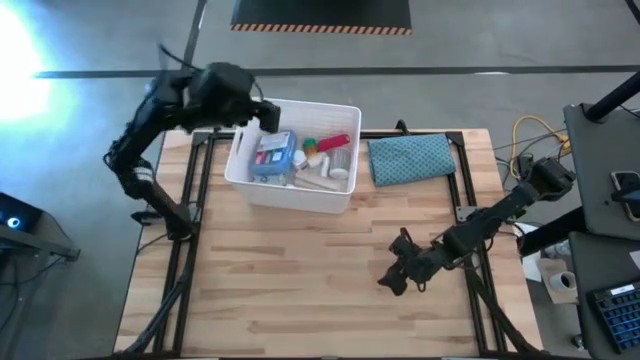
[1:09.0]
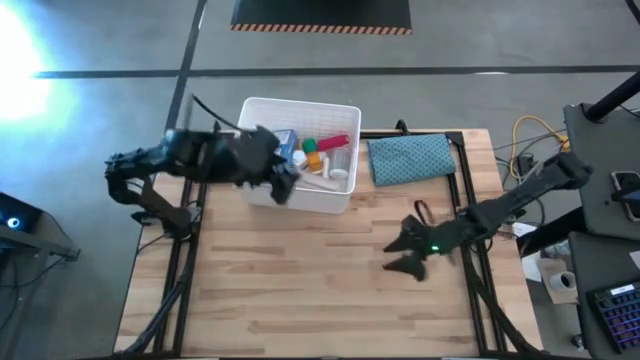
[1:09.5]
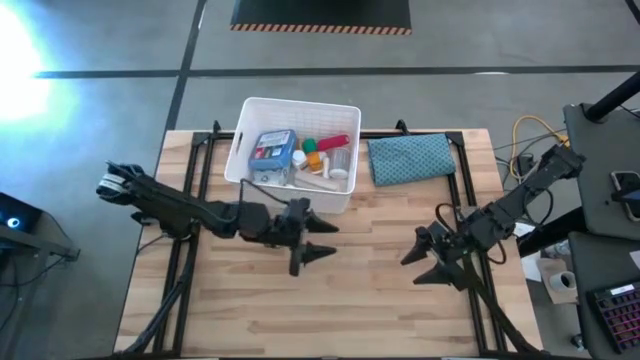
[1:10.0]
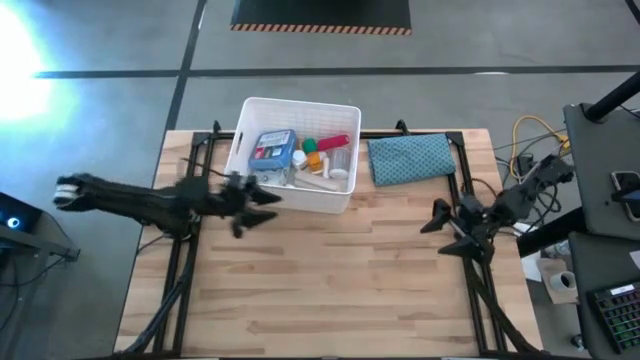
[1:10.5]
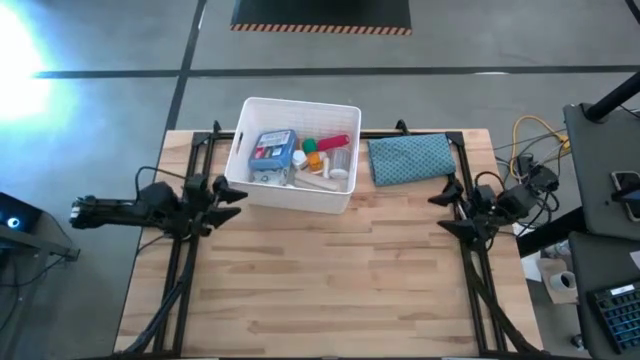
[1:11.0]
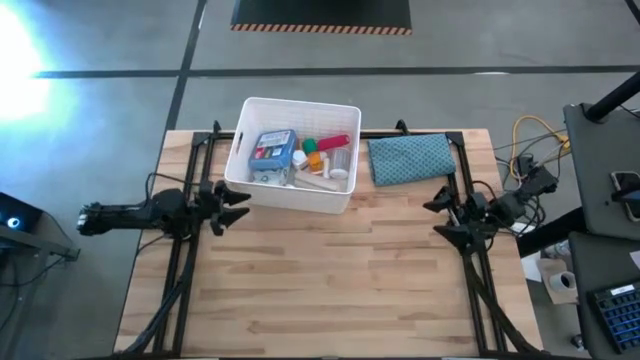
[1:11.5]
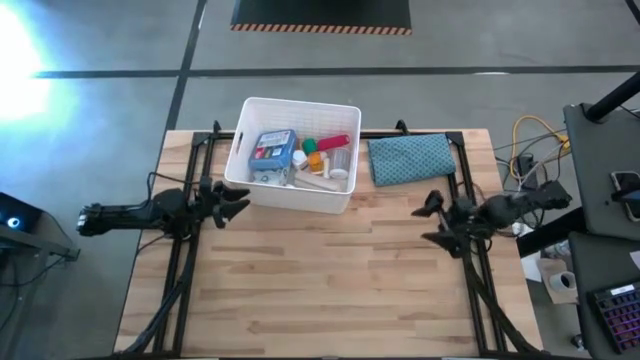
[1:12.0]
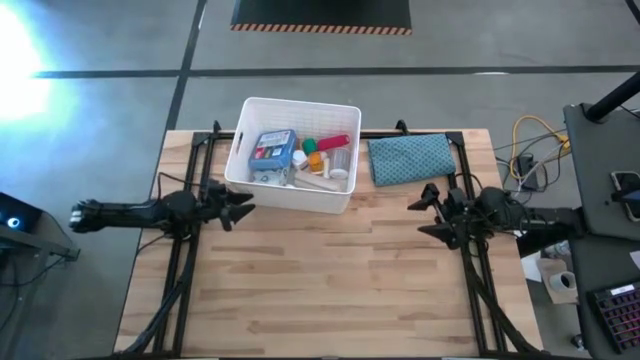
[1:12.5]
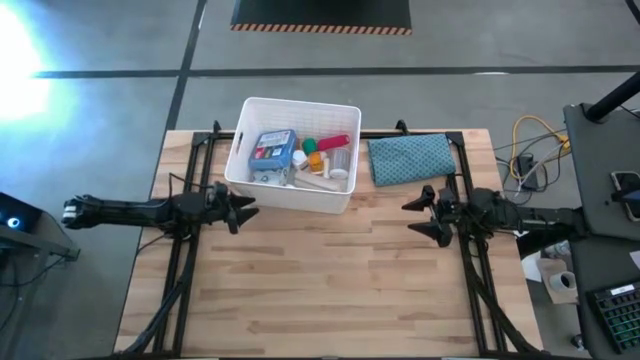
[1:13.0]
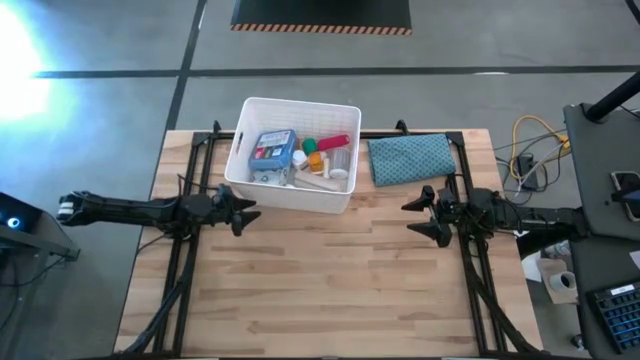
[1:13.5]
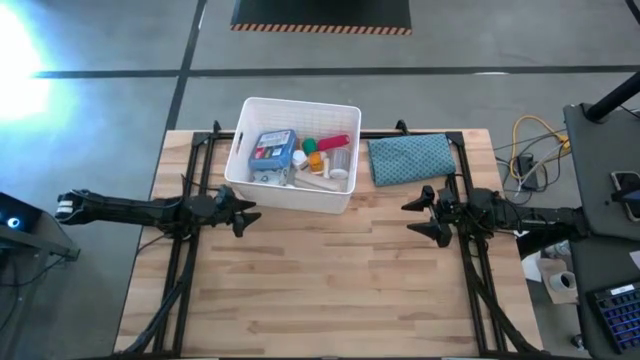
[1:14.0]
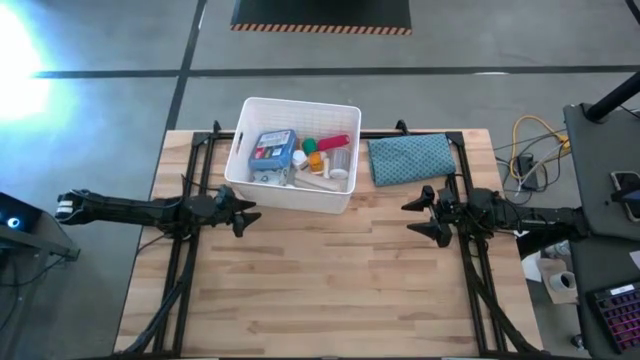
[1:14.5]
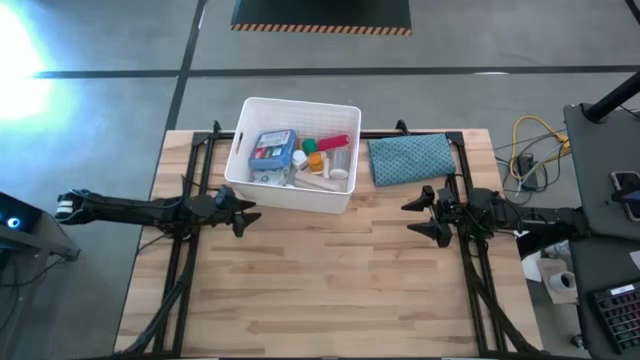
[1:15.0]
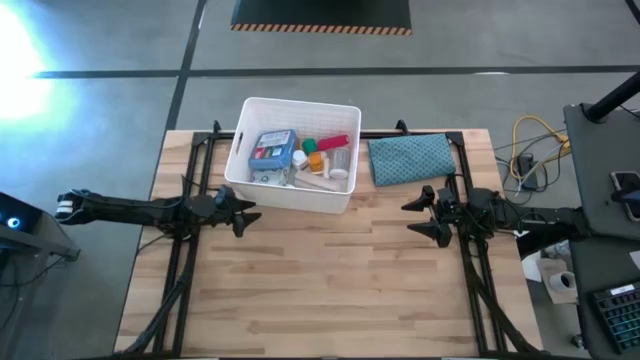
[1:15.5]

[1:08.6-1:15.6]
Task: Pick & place medical supplies in basket/bin
Return to Home Position

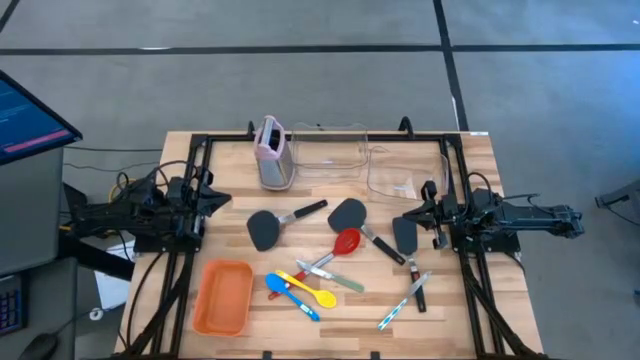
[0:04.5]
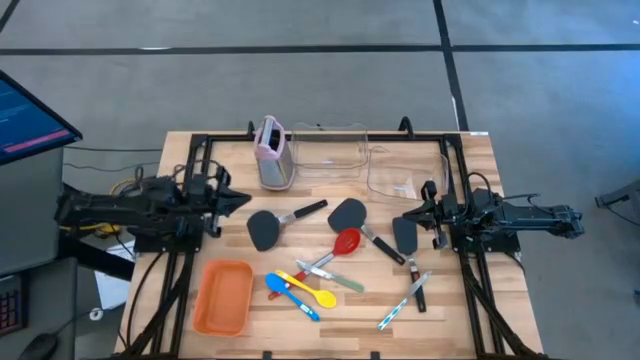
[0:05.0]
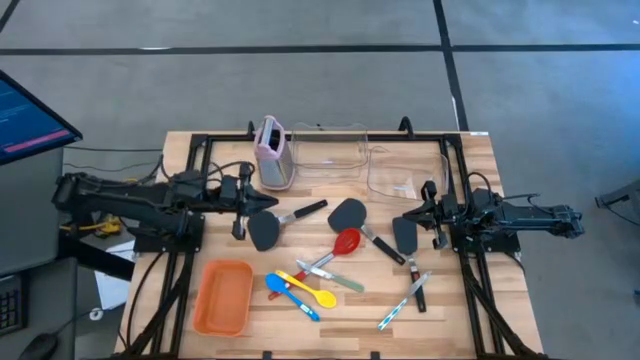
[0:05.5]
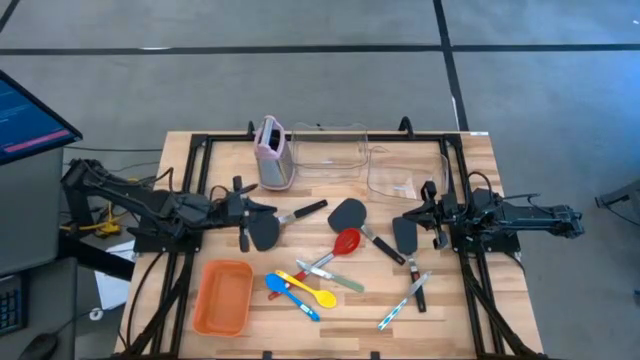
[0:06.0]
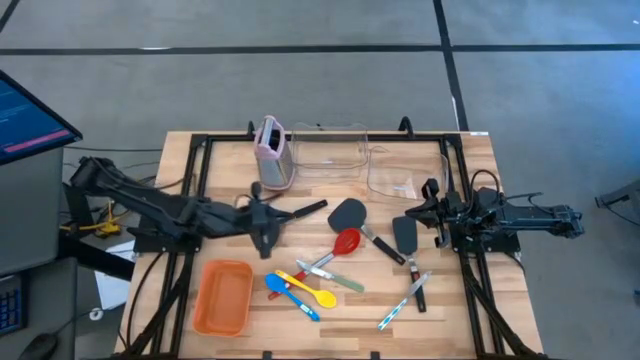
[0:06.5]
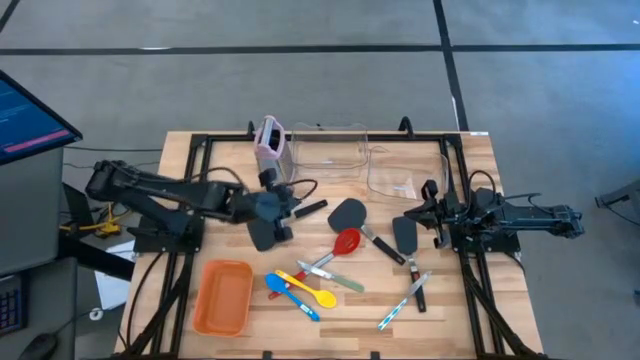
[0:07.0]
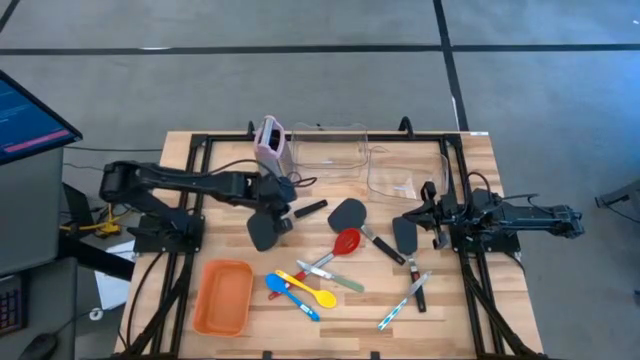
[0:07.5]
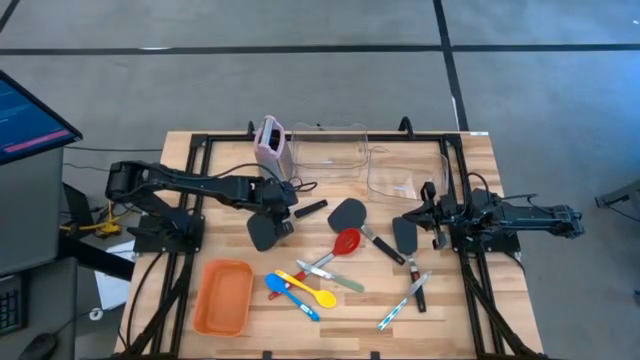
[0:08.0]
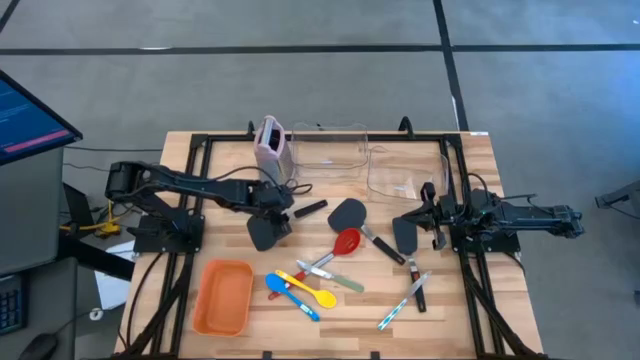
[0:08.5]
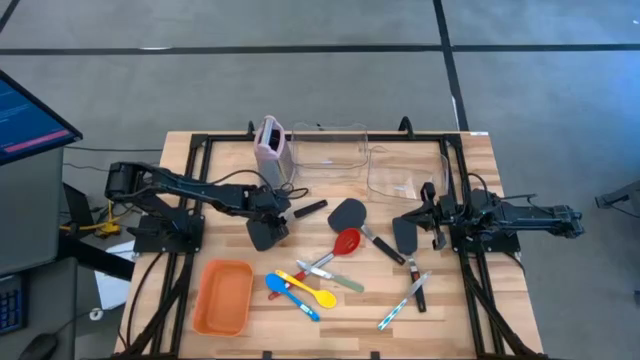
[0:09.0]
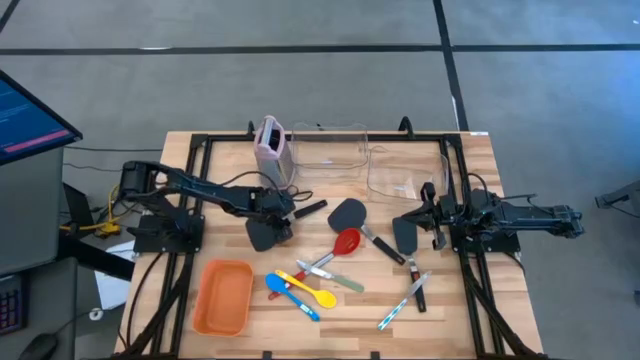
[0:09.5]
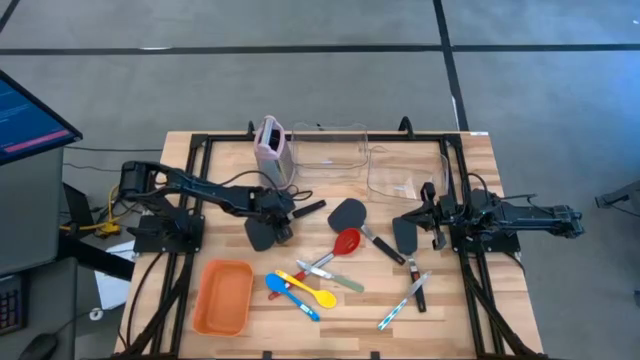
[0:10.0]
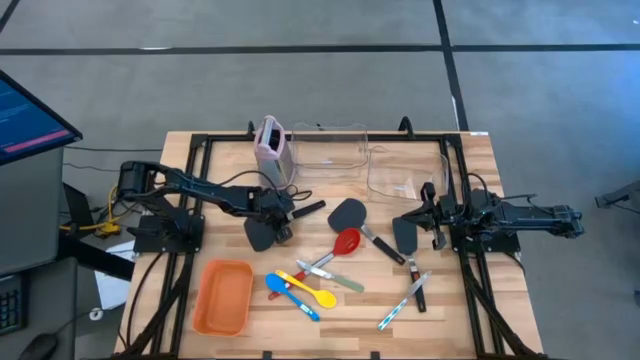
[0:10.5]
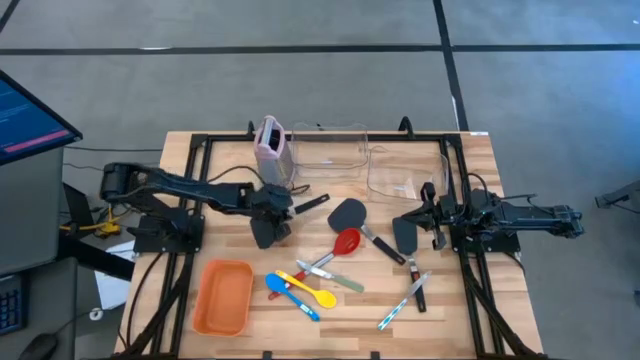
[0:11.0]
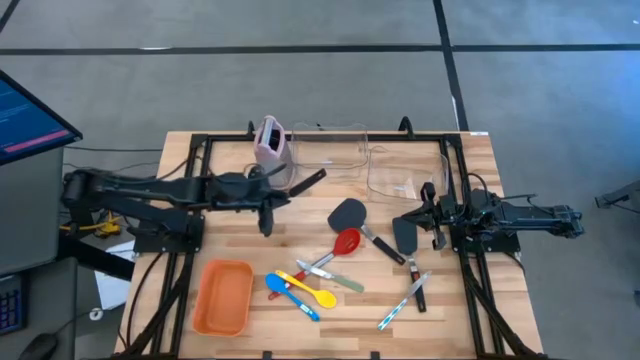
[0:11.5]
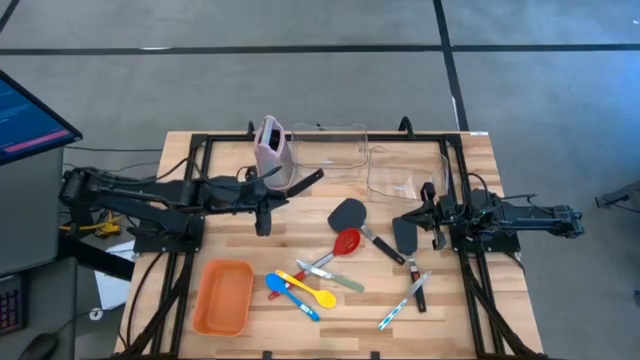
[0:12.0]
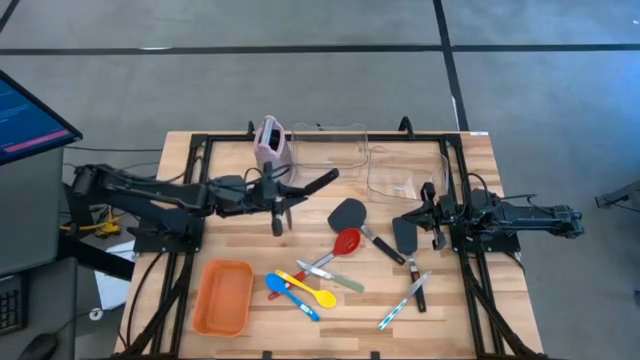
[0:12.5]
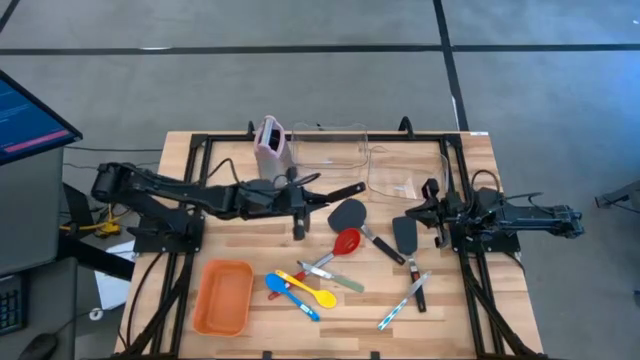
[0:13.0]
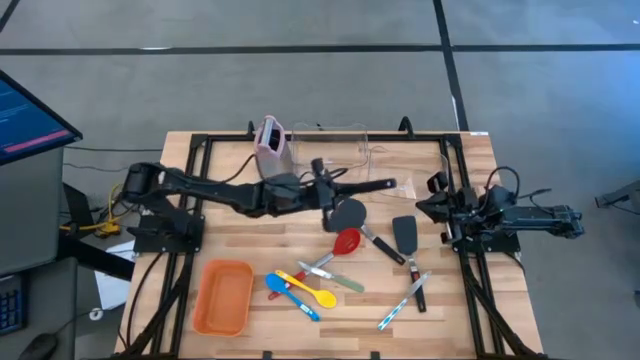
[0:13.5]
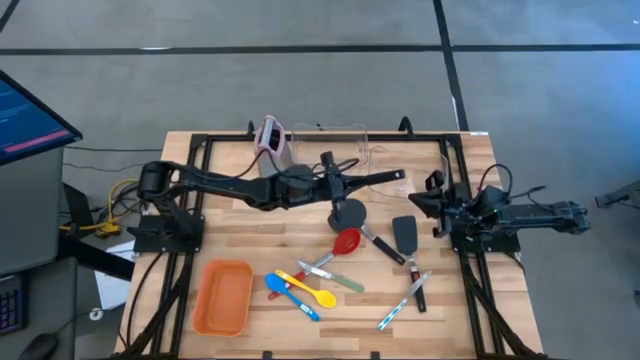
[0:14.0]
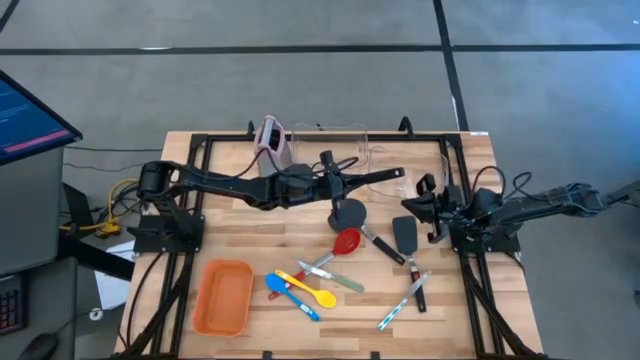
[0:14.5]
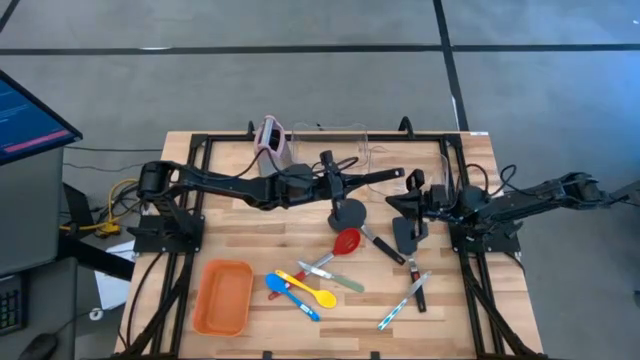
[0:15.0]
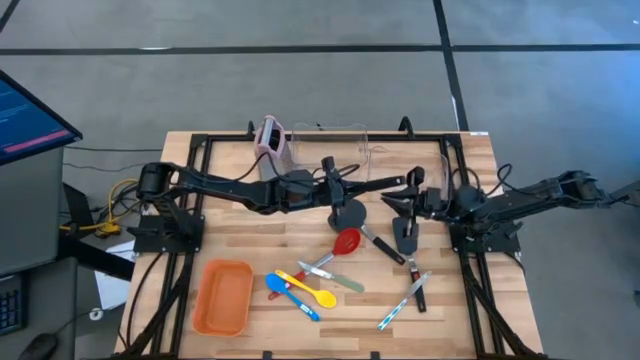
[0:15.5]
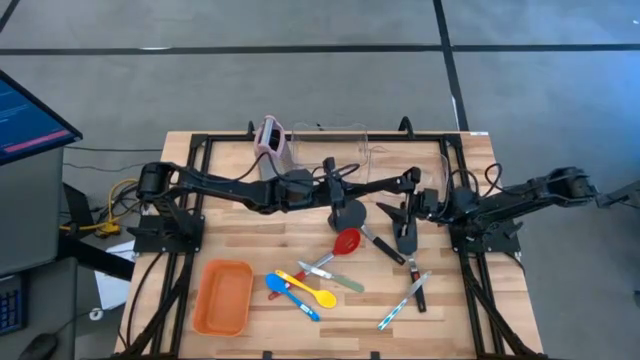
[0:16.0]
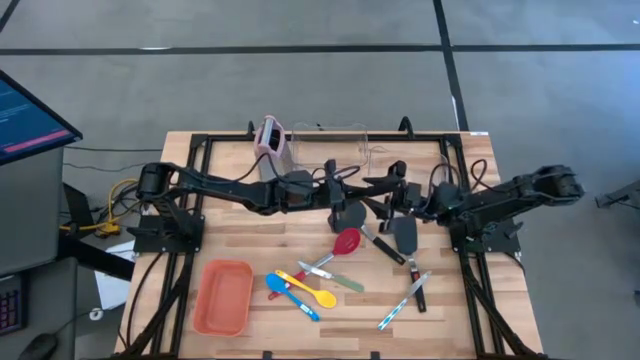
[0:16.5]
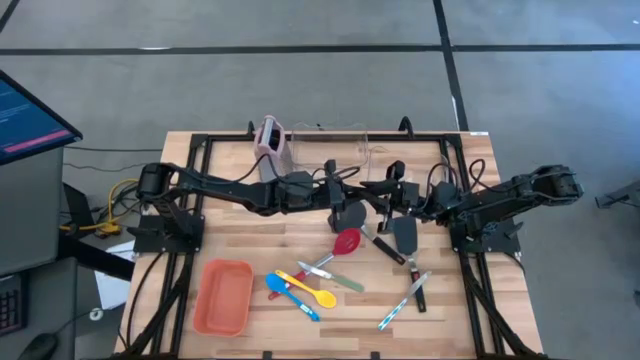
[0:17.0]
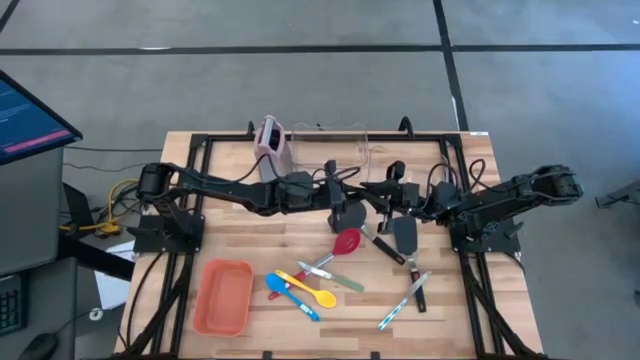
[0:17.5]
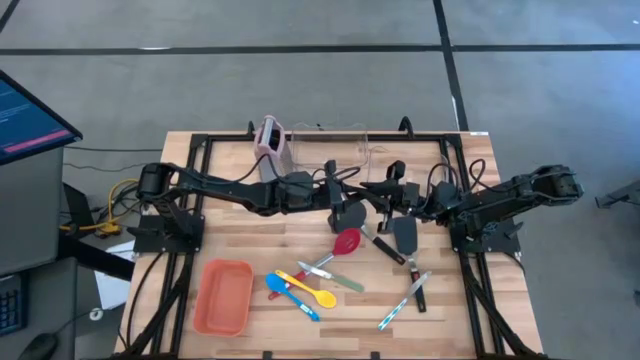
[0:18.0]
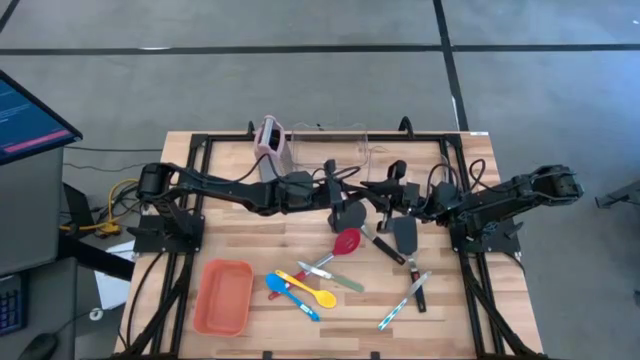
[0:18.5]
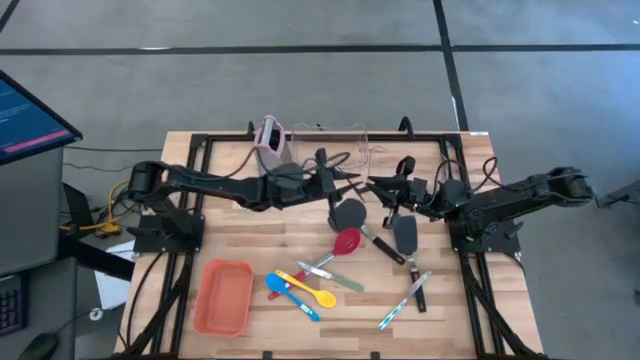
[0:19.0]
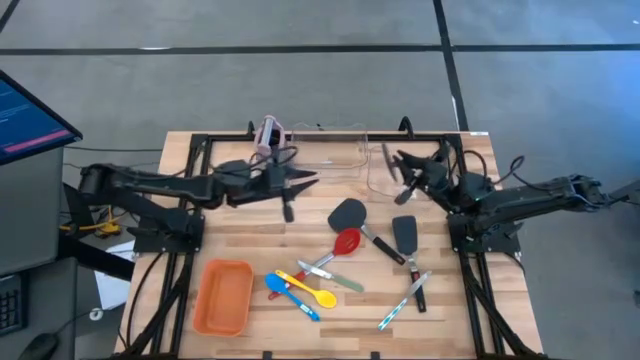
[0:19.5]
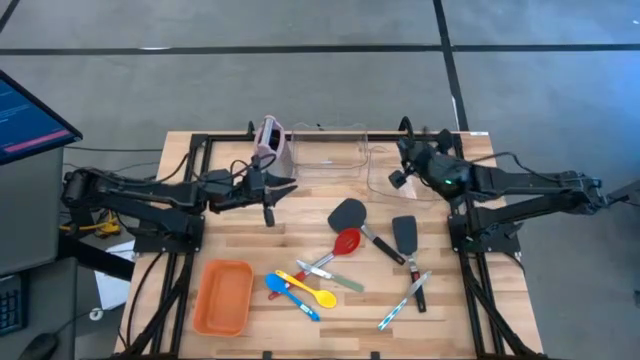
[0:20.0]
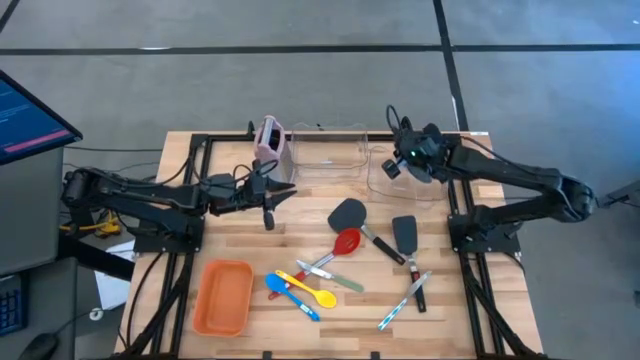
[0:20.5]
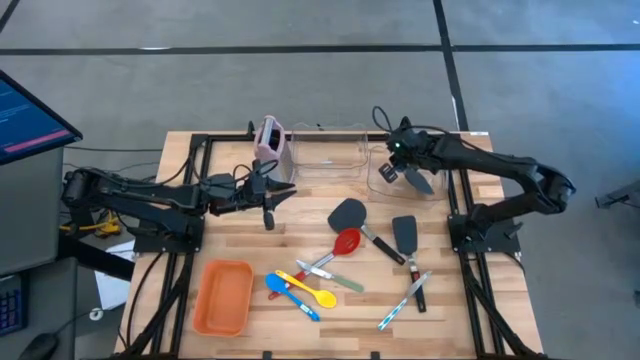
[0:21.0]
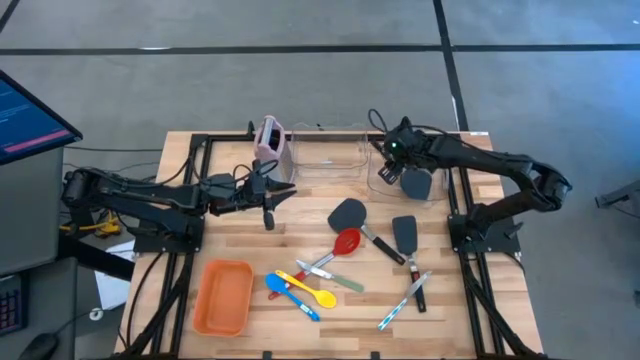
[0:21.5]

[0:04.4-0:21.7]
Task: Pick & Place Kitchen Items
Put the top left black spatula into the right transparent bin
